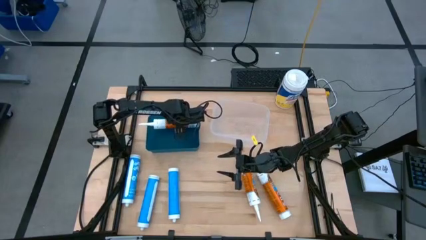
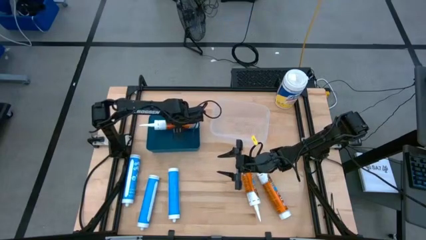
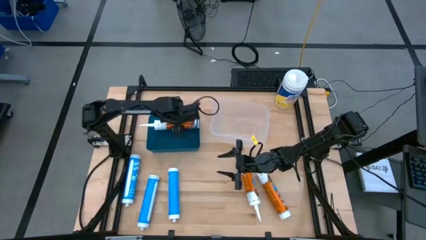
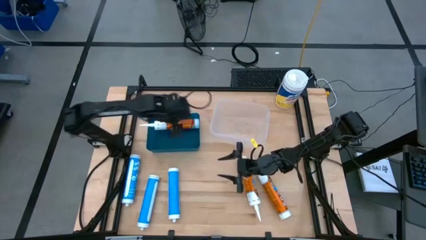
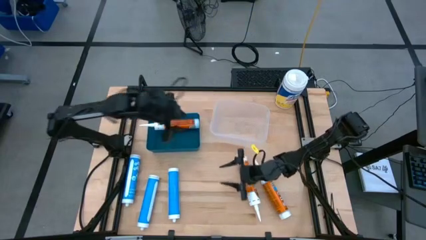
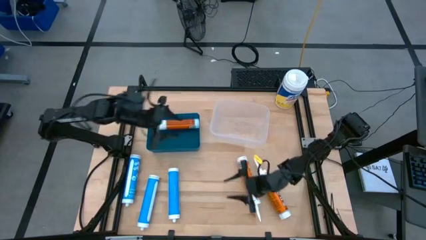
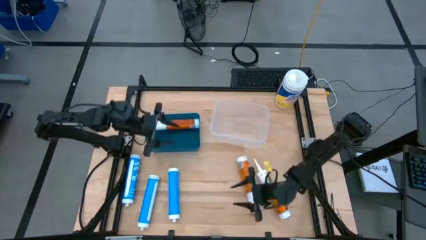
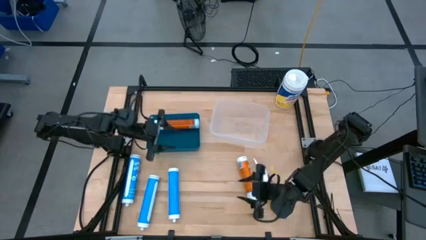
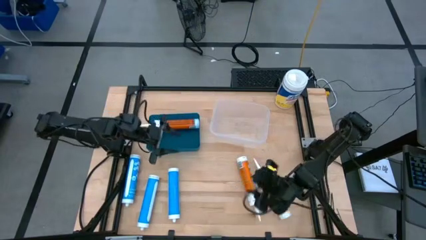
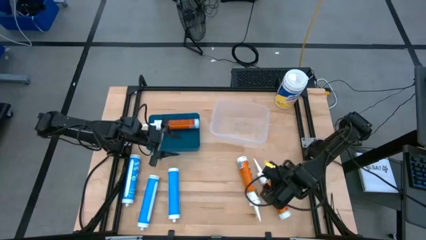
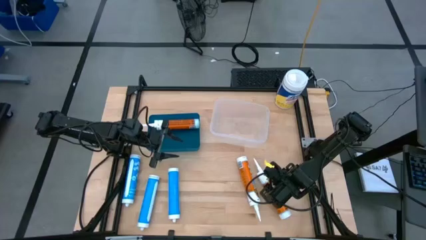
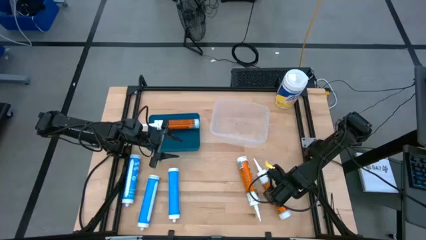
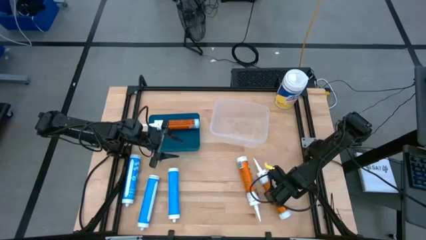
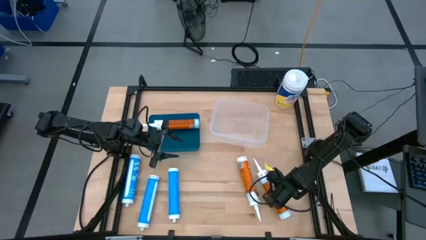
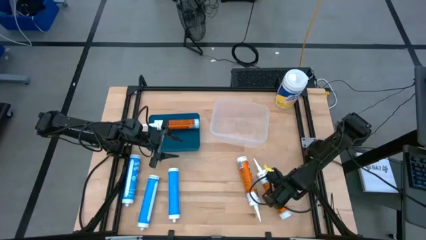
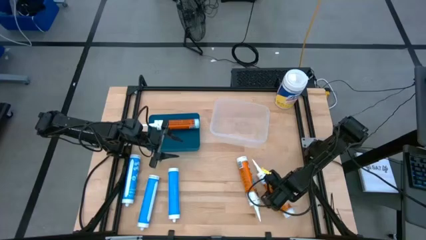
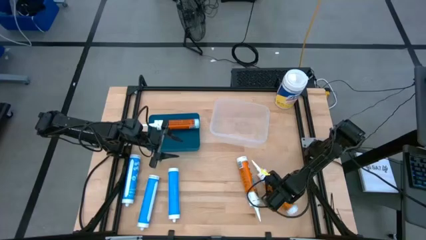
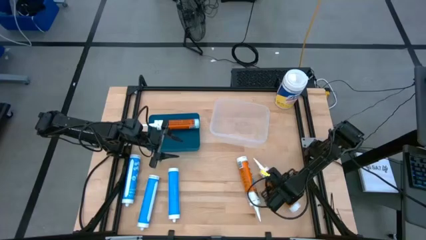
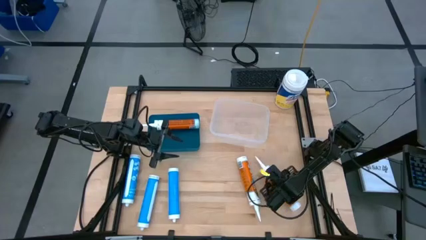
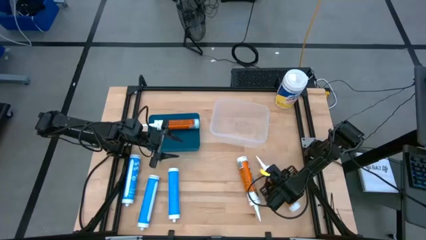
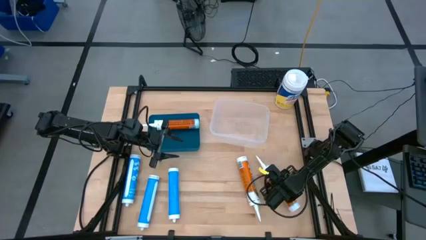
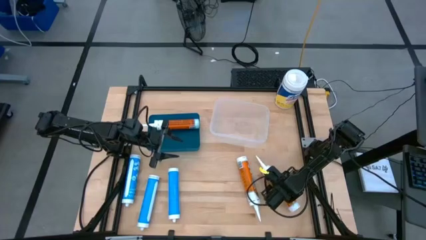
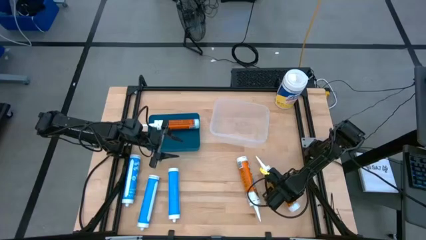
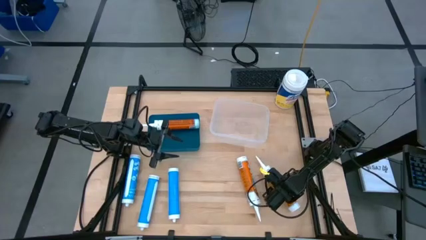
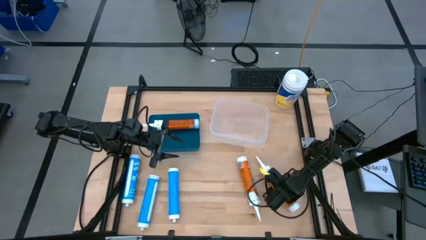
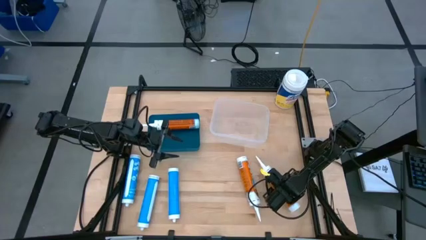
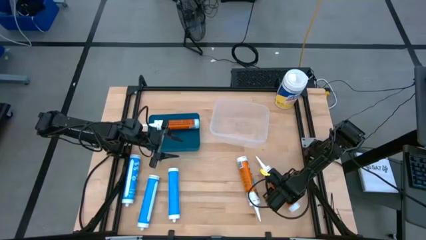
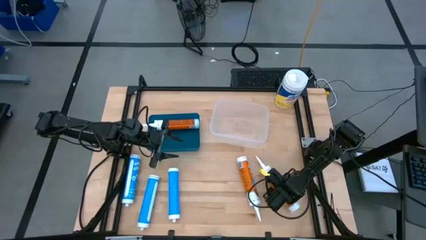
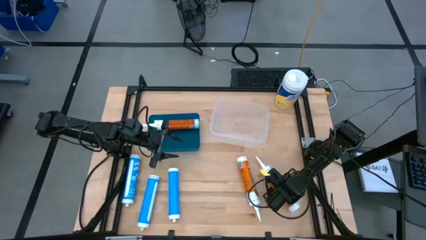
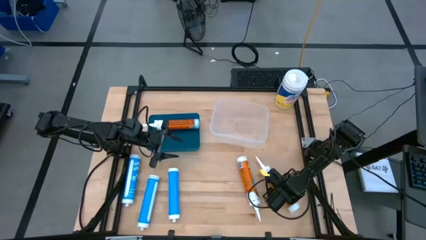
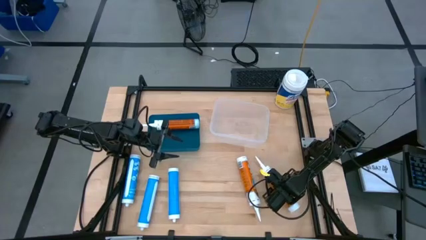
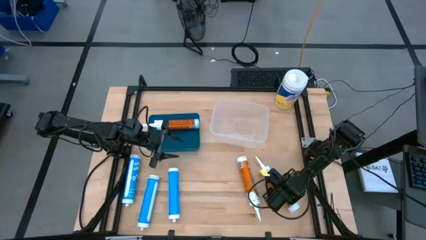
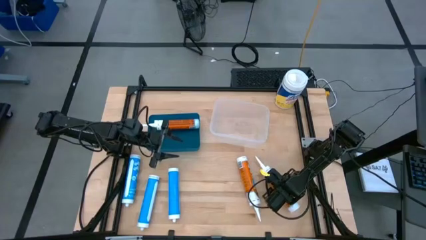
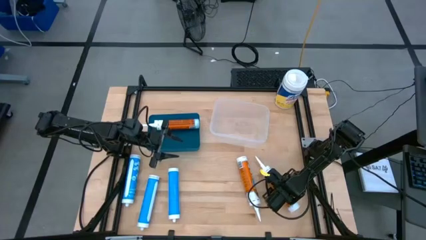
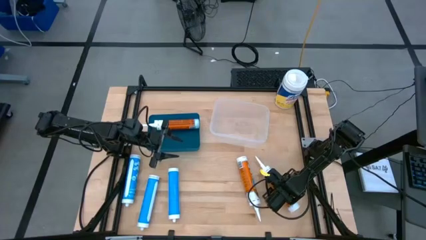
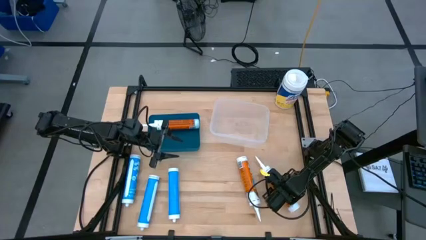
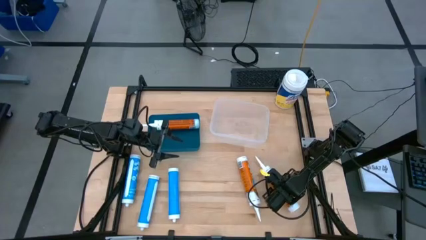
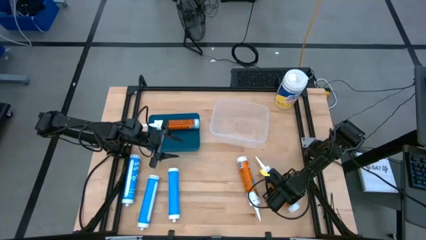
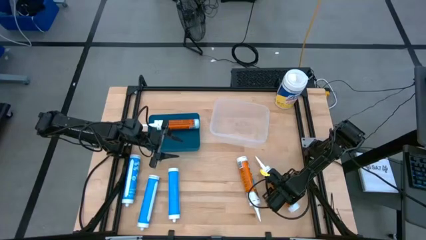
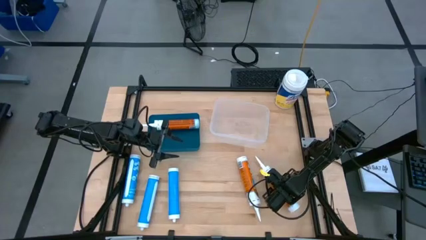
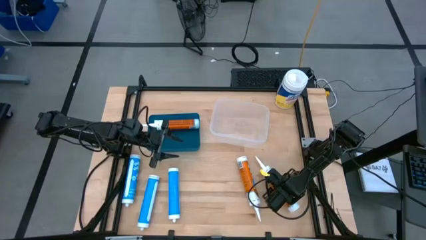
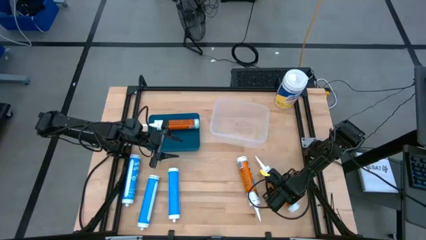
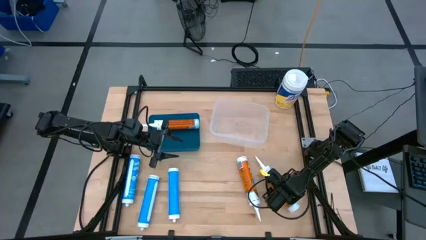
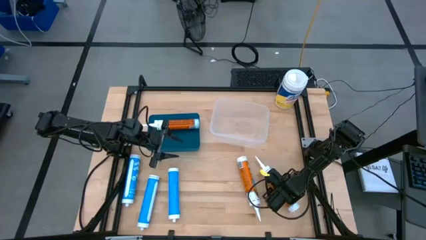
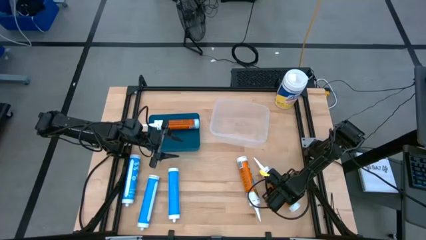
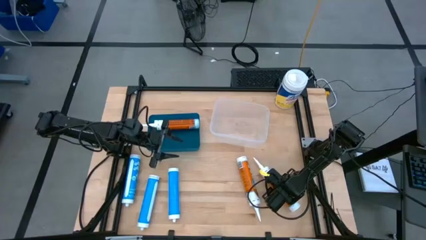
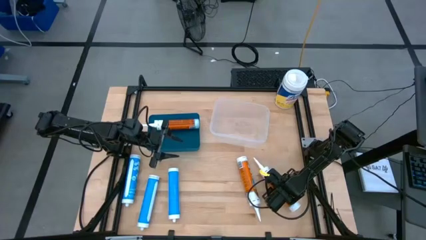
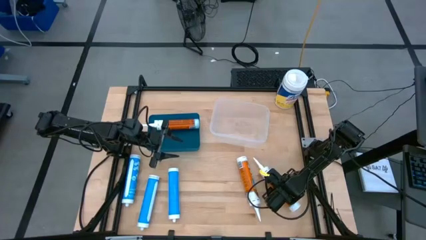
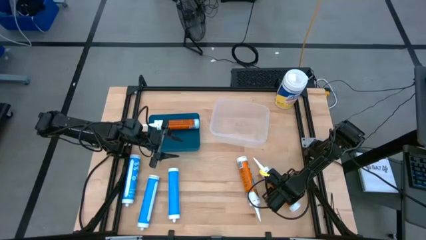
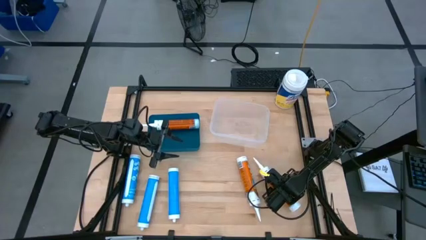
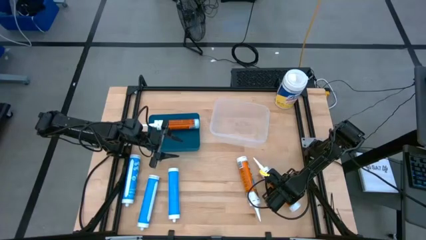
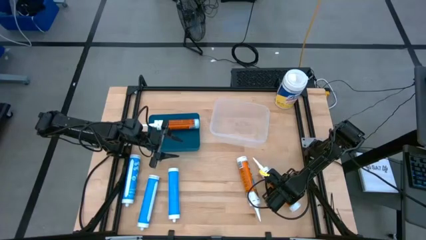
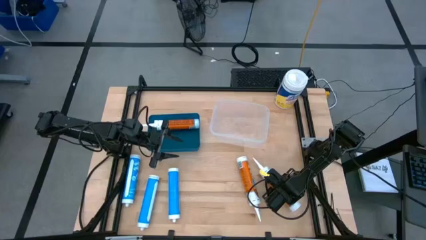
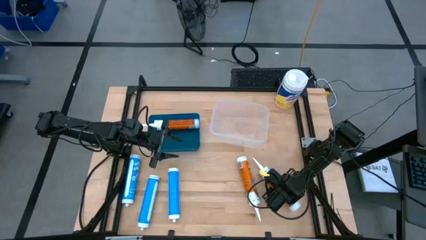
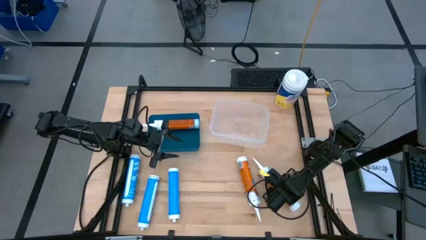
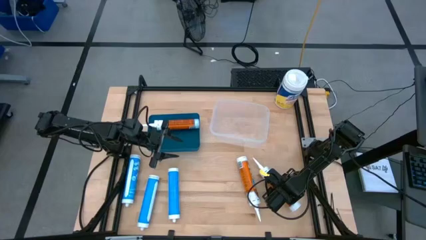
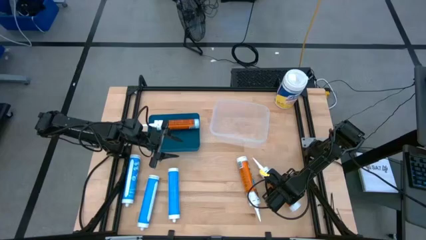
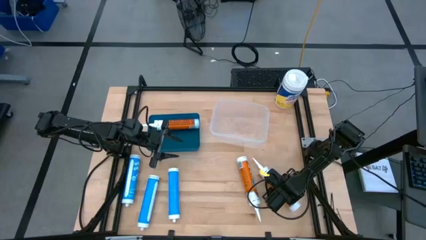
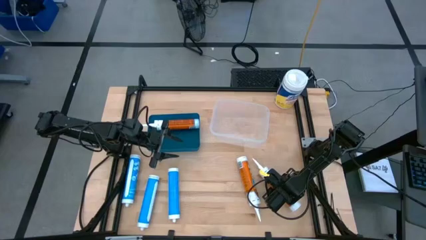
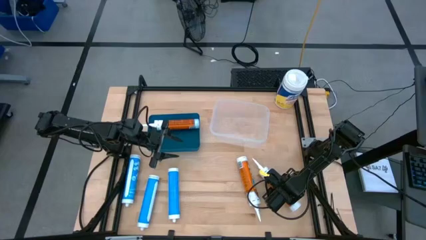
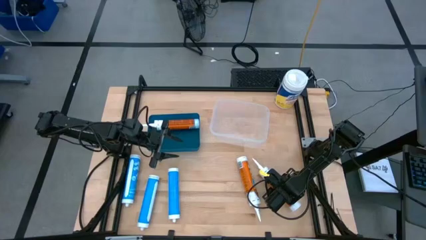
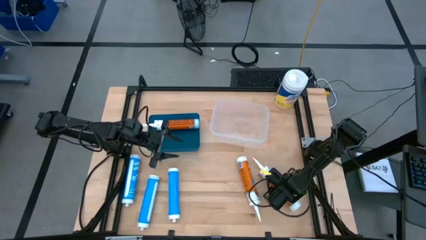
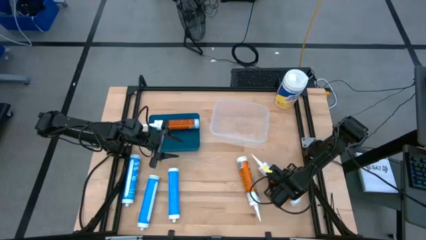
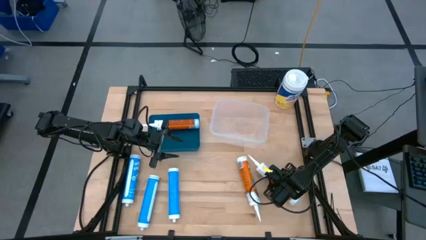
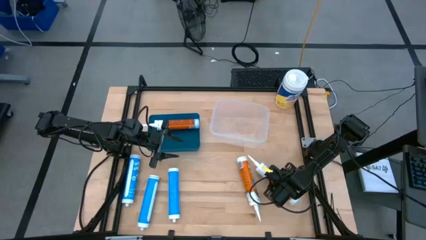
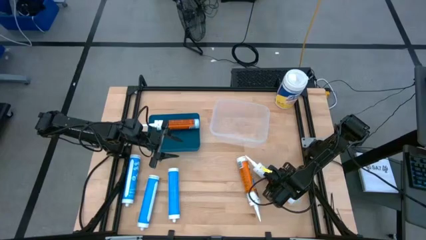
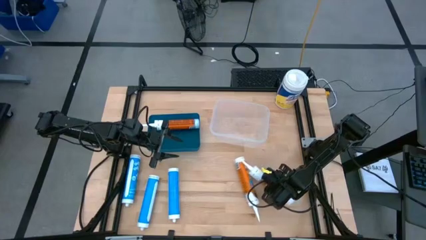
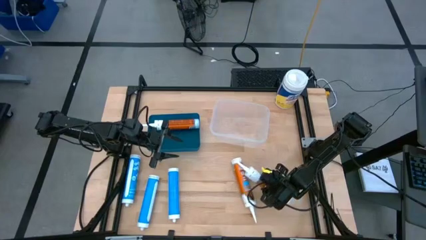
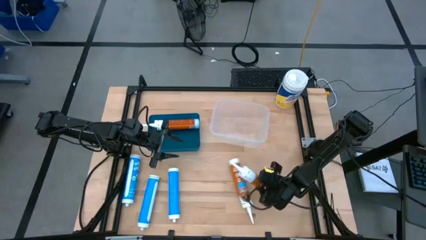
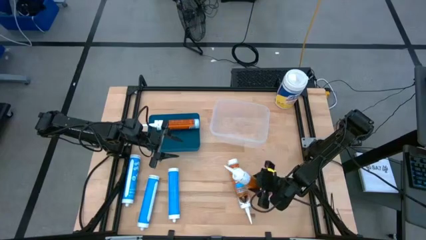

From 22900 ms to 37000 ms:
Task: Pick & place silicon tubes, Sealant and Lysol wipes
Put the right orange sealant into the blue bin

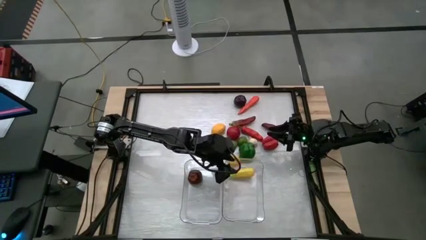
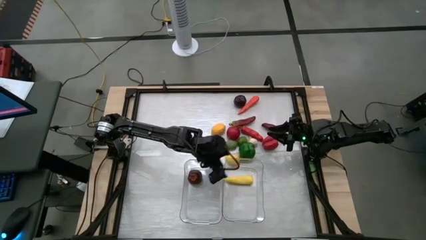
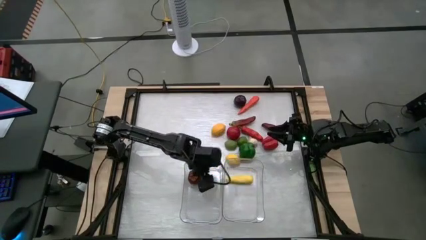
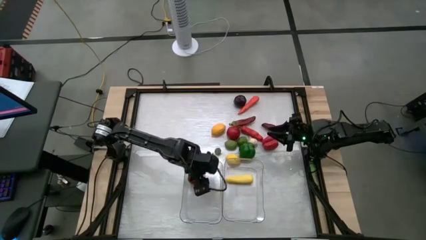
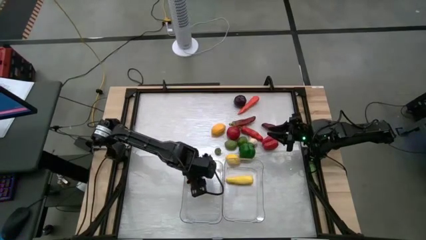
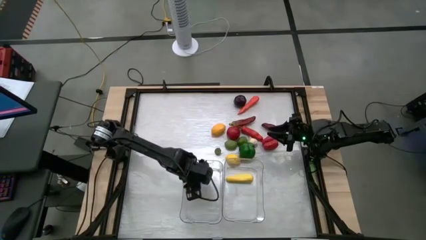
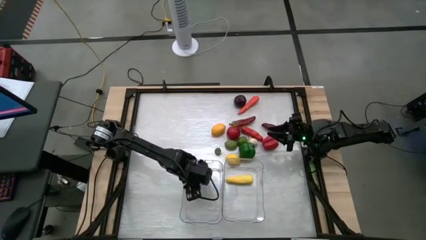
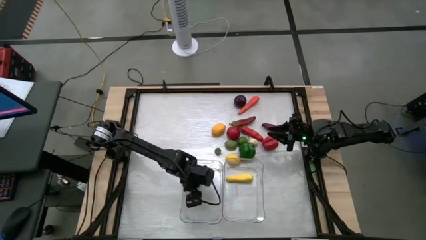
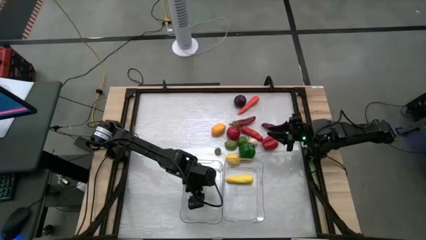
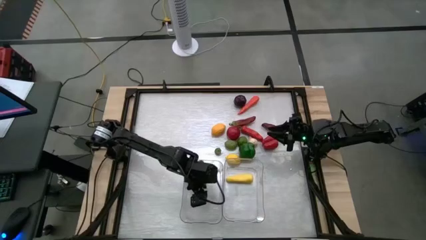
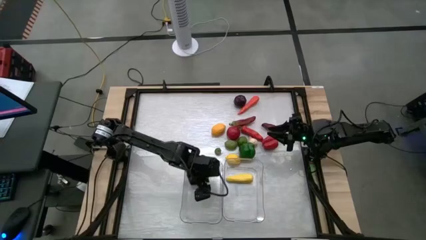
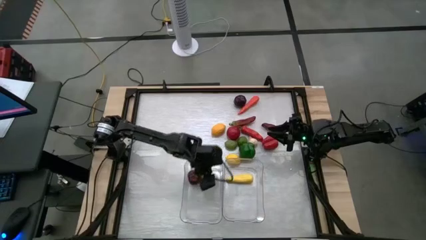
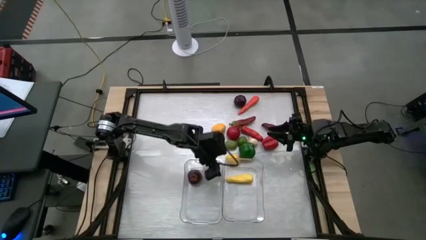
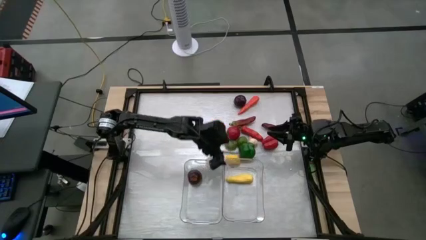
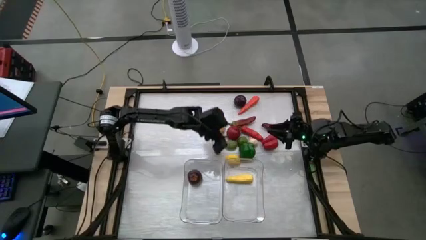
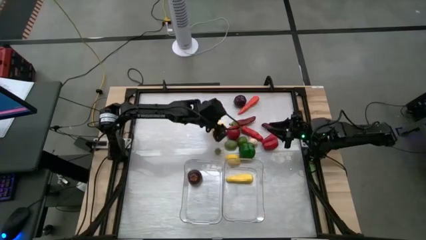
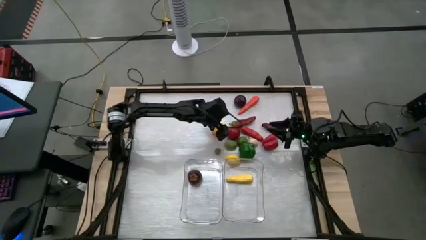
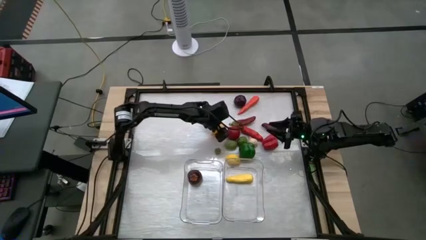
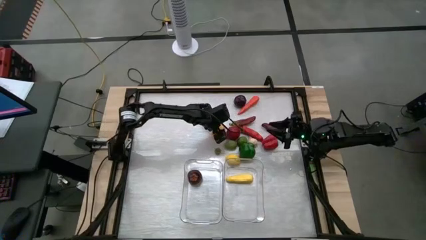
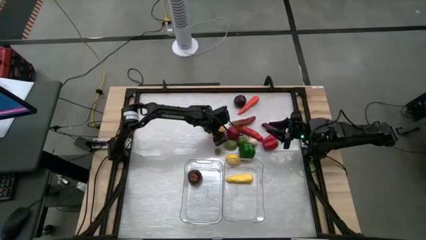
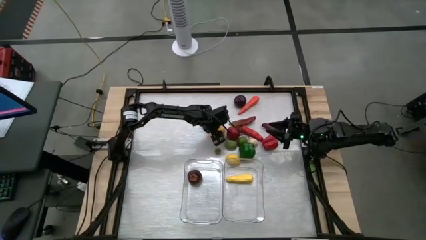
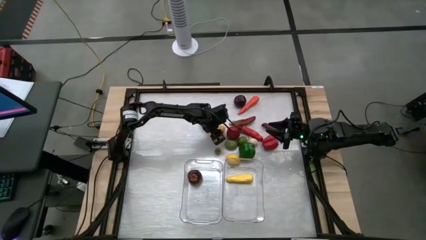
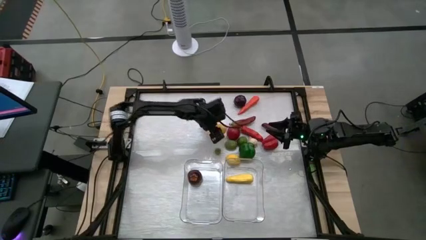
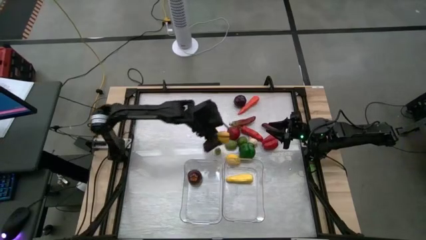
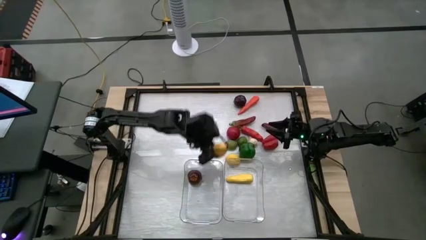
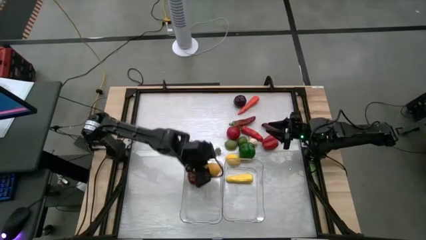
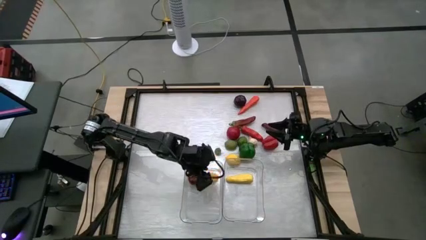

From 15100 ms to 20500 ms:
Task: Sort produce into baskets
Put the top lemon into the left transparent bin
